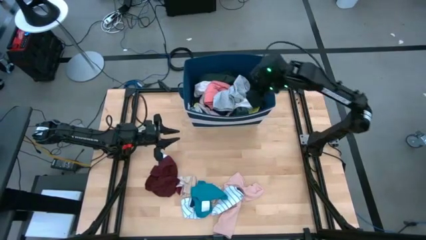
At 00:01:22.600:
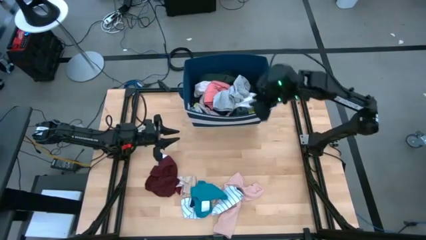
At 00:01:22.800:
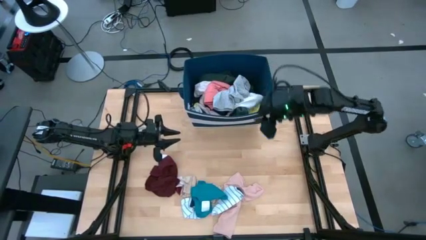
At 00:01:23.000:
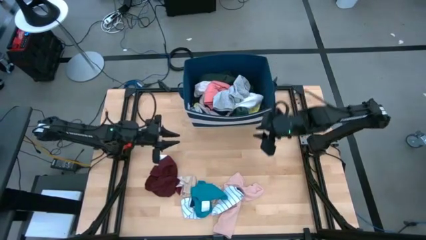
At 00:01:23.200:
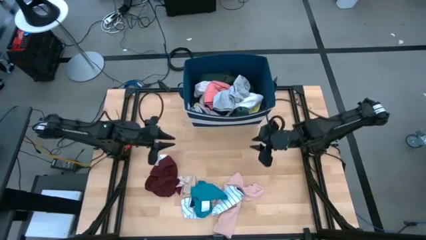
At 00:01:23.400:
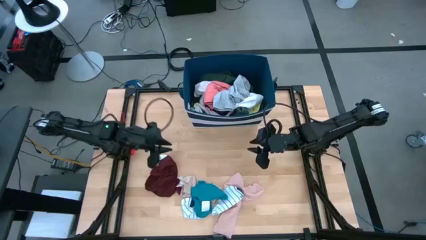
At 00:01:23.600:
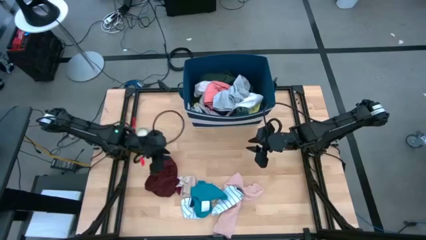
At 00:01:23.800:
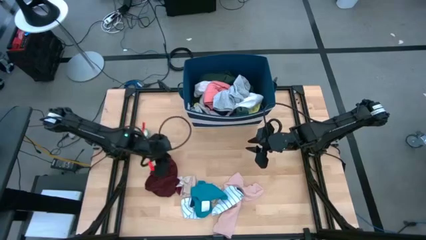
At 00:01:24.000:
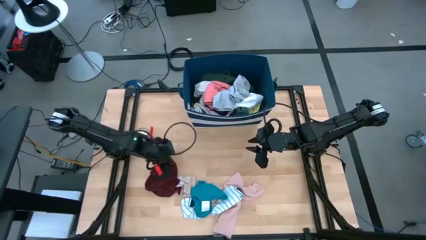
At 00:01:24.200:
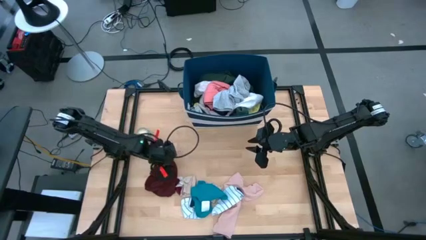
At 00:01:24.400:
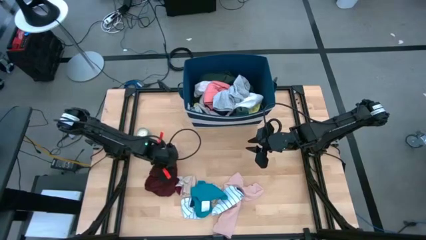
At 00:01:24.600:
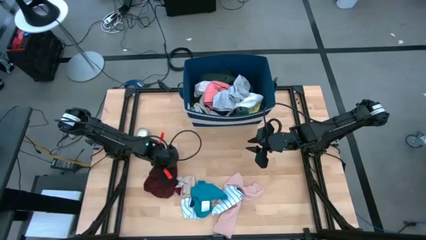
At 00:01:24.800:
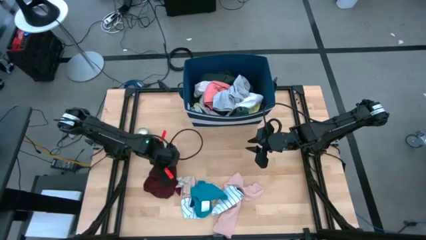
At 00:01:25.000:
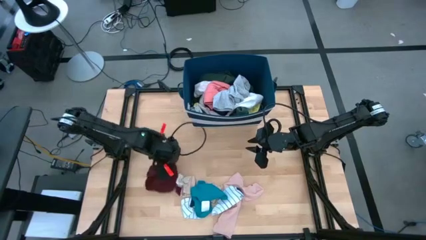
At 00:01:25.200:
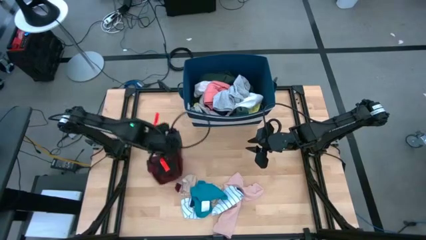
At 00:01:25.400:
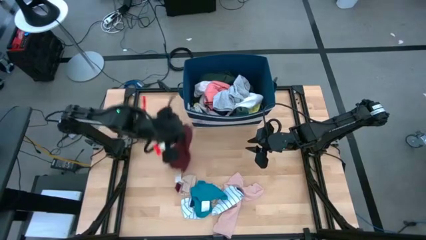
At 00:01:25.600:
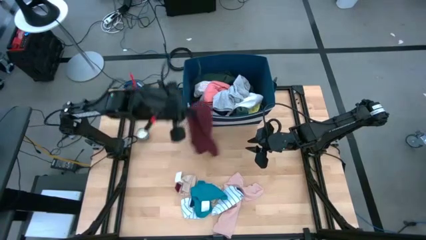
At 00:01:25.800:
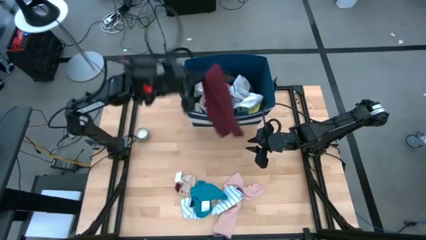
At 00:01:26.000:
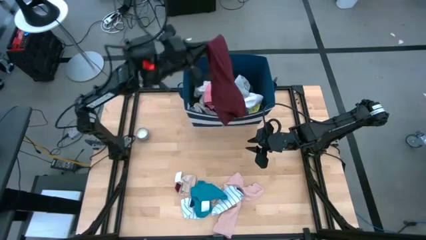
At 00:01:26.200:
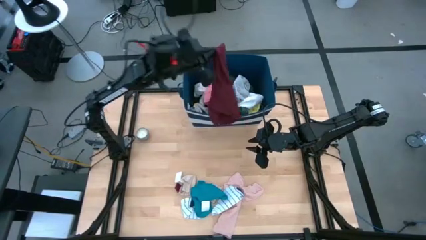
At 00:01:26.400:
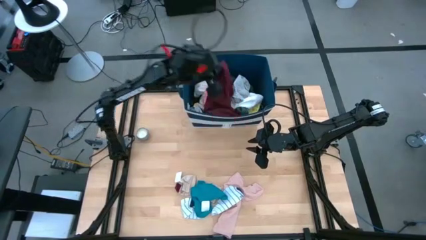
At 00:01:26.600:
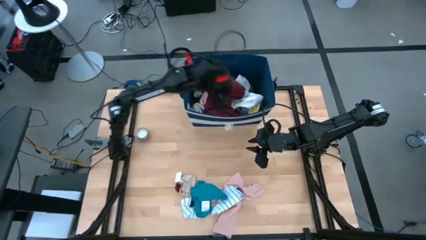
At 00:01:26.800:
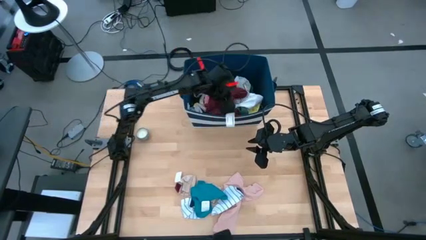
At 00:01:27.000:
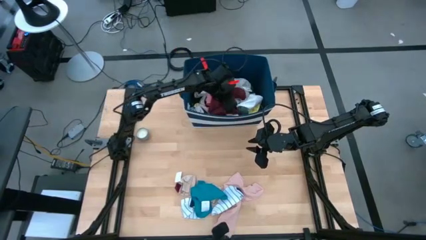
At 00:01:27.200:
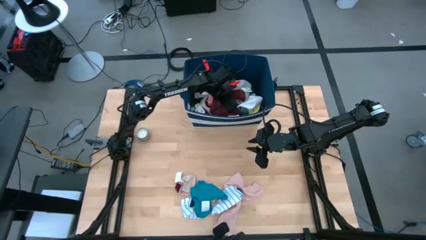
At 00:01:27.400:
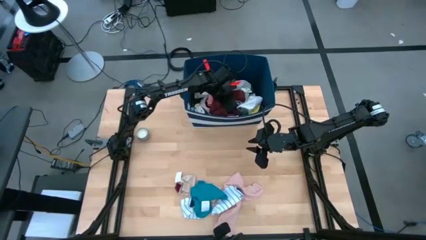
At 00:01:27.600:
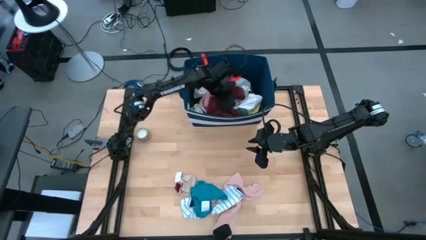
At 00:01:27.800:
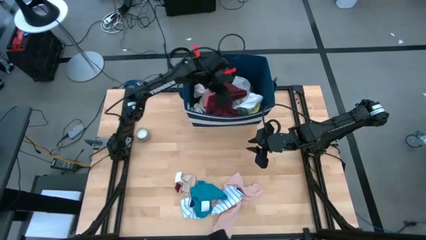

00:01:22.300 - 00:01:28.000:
Task: Sort clothes
Put the red boxer into the blue laundry bin

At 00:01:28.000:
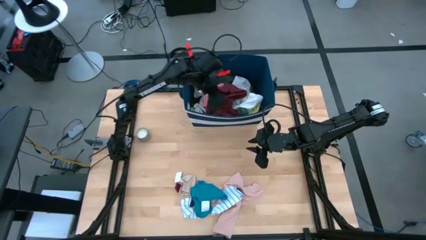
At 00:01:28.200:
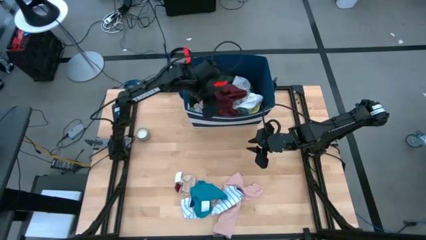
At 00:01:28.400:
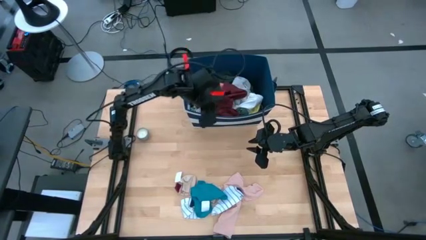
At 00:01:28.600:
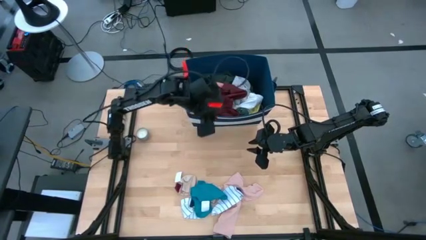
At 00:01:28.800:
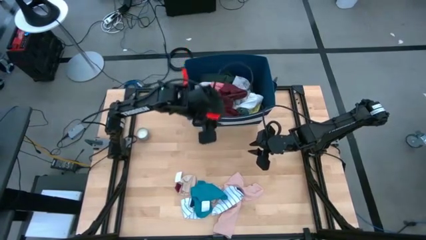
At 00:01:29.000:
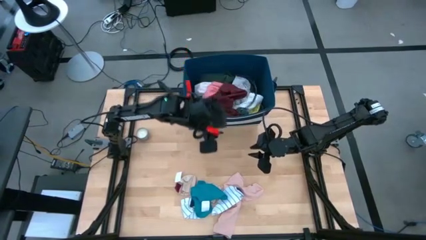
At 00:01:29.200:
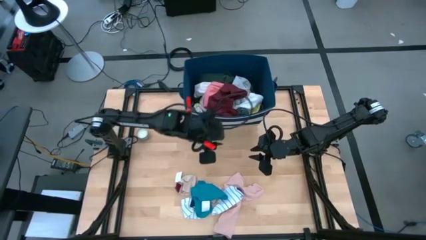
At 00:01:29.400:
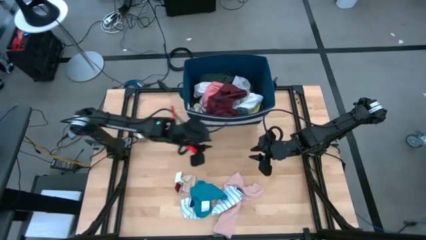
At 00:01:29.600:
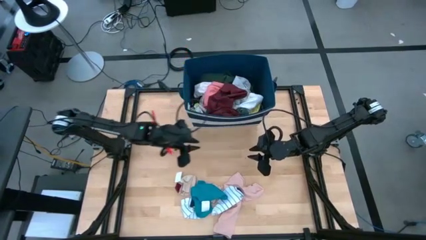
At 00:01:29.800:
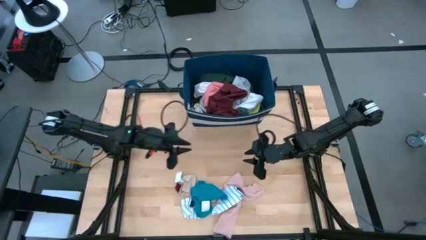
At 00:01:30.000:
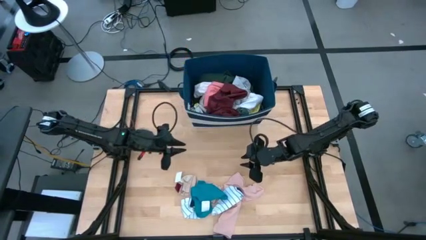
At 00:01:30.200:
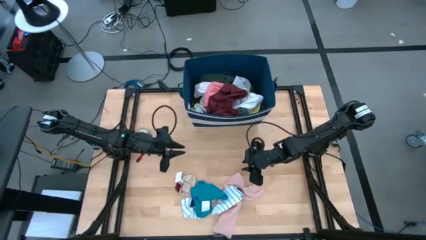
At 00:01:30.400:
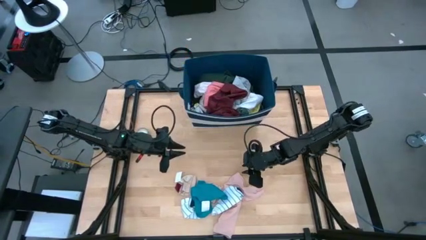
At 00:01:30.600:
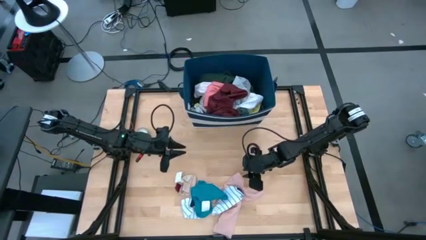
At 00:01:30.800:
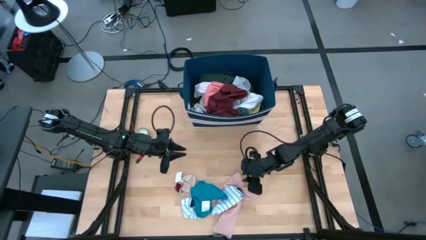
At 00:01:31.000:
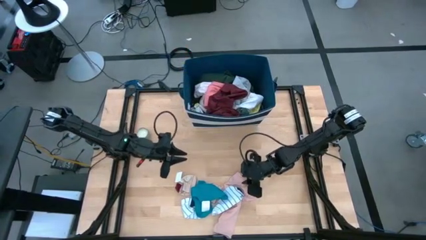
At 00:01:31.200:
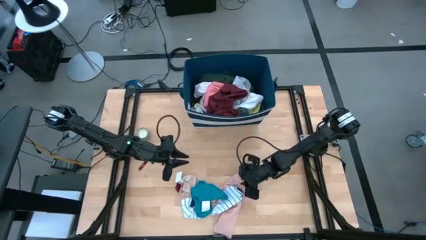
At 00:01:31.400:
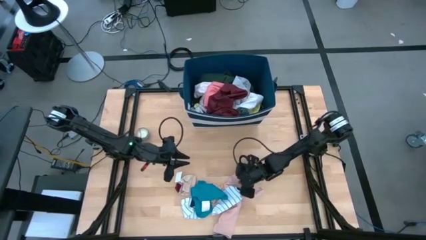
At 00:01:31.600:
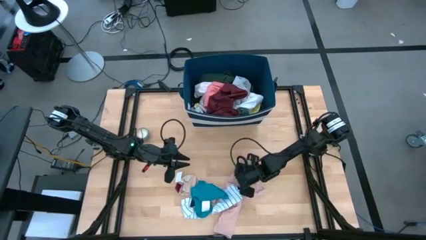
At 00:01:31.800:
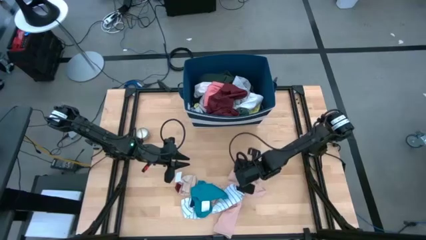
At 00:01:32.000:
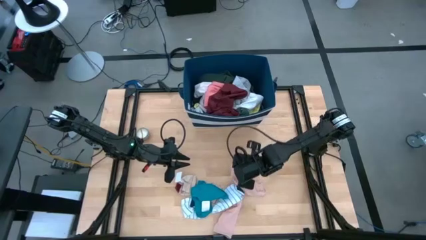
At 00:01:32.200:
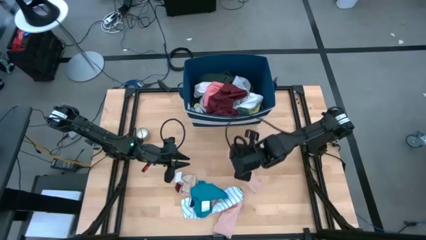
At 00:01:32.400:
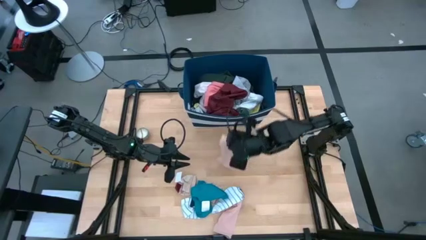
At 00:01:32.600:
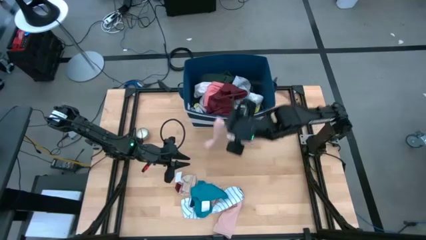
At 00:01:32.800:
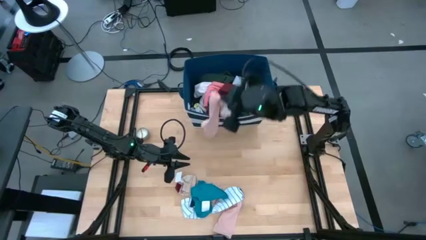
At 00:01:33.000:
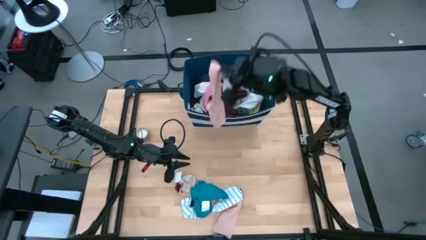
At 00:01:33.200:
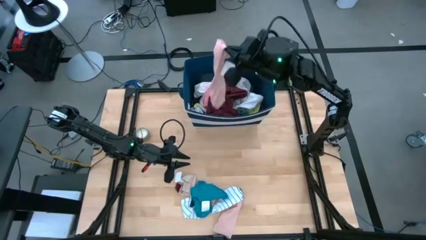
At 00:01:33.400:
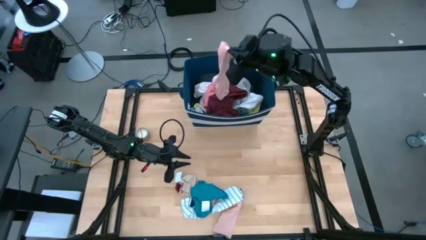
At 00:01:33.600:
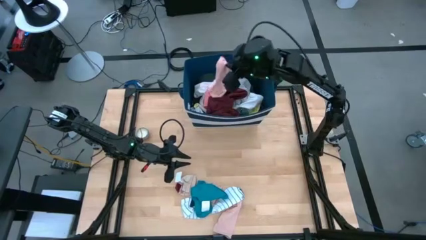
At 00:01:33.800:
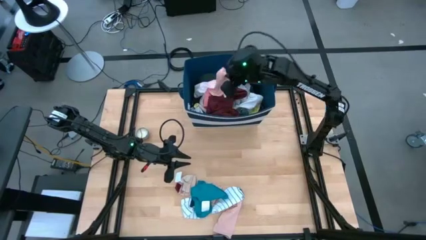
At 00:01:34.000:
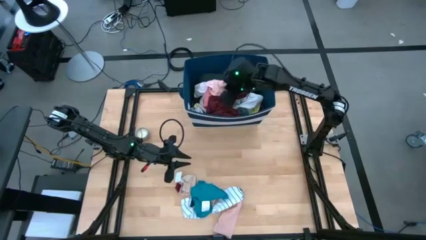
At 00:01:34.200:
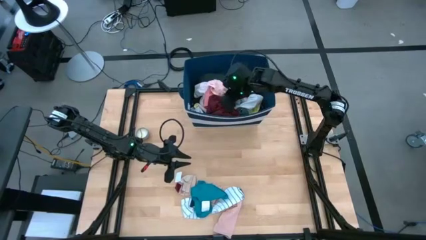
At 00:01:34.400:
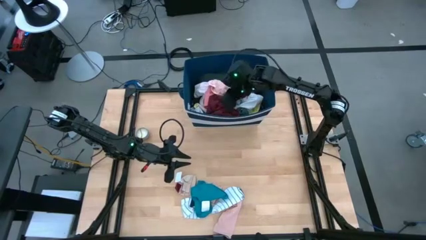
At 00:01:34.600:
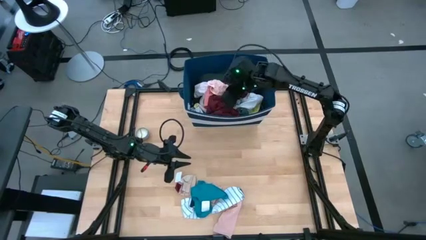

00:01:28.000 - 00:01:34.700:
Put the top pink sock into the blue laundry bin

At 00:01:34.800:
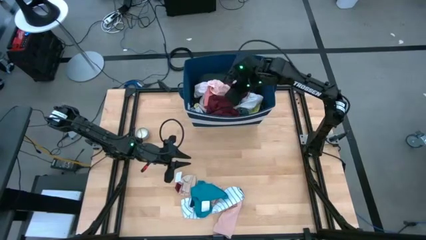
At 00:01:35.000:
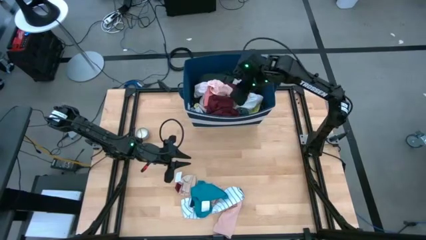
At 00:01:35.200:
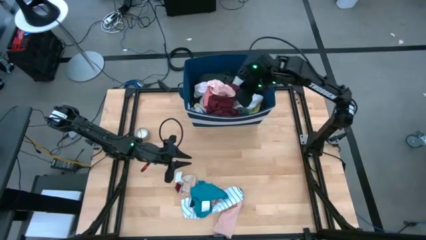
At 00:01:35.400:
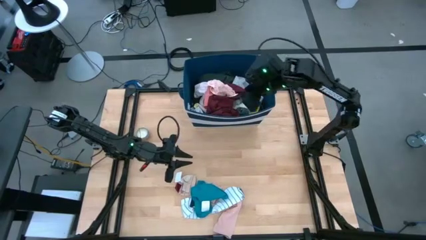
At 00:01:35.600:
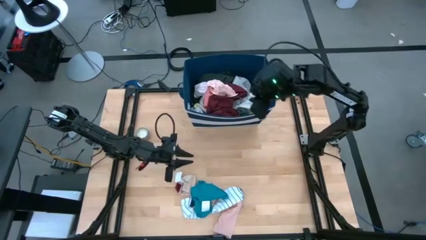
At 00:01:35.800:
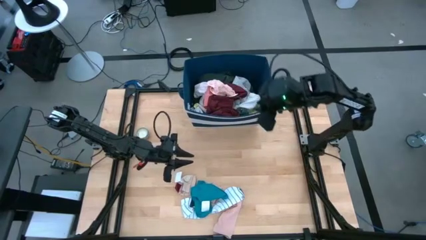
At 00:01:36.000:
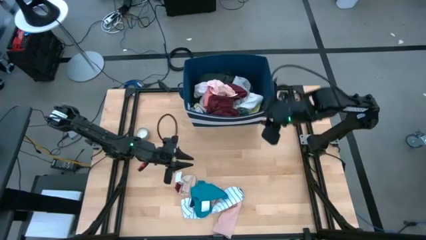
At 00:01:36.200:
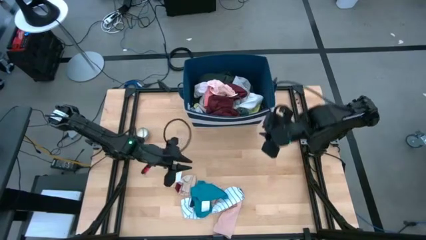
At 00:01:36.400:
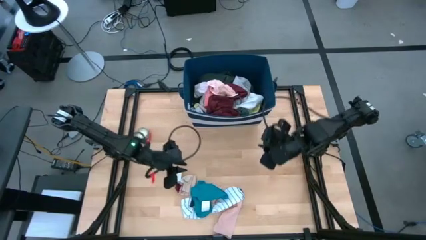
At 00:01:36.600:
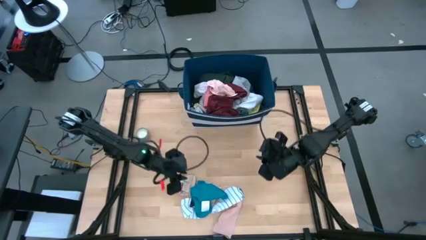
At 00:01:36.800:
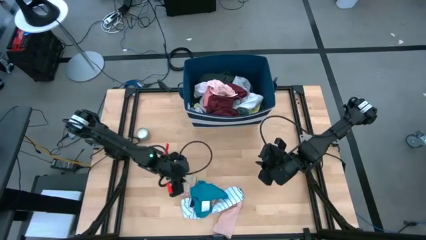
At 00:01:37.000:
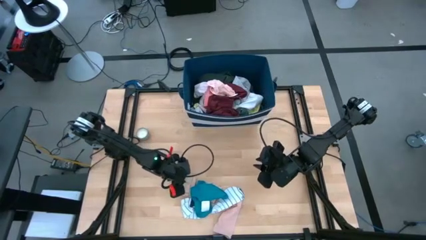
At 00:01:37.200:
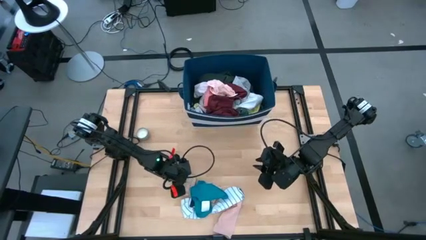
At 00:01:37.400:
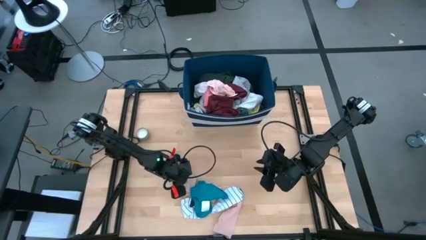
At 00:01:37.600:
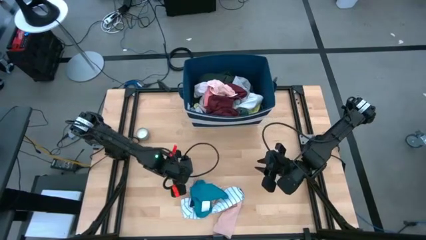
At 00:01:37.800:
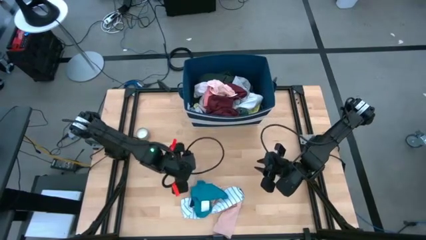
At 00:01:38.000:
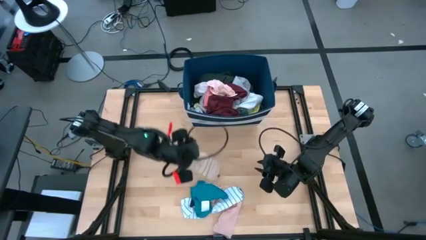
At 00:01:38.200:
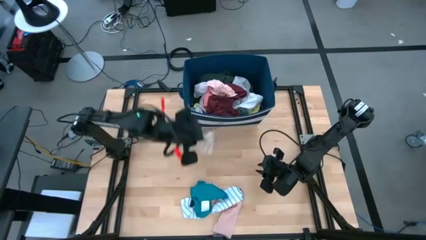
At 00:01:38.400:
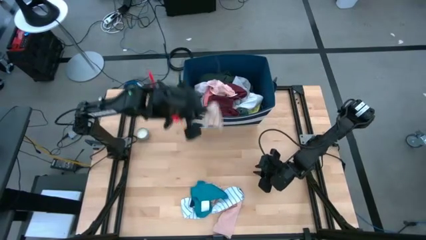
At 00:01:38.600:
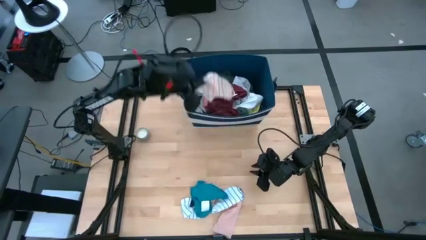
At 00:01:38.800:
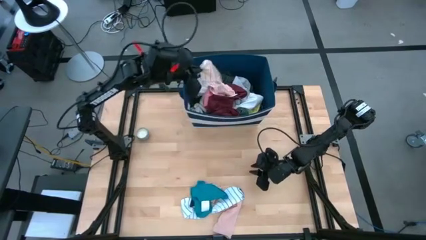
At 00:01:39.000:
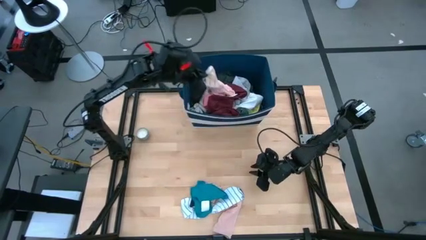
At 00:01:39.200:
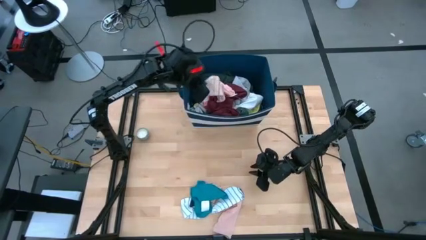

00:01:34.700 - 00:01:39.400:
Put the brown sock into the blue laundry bin
